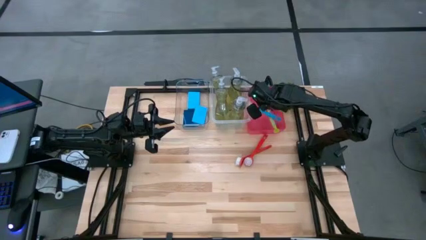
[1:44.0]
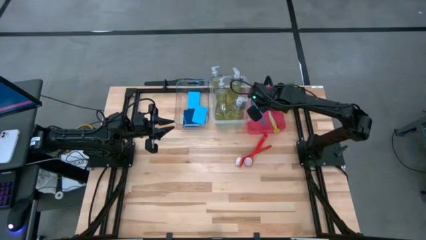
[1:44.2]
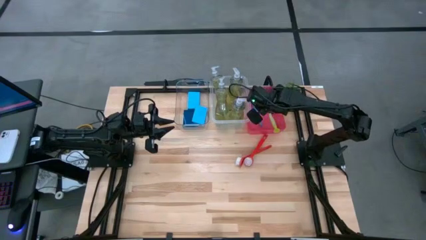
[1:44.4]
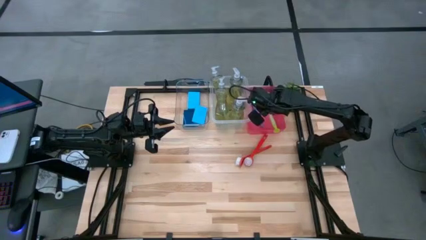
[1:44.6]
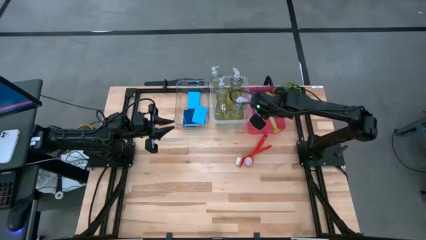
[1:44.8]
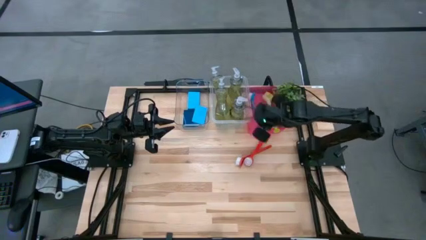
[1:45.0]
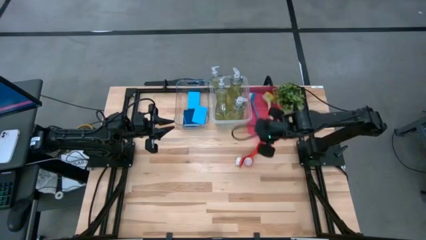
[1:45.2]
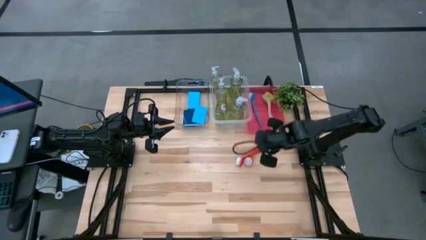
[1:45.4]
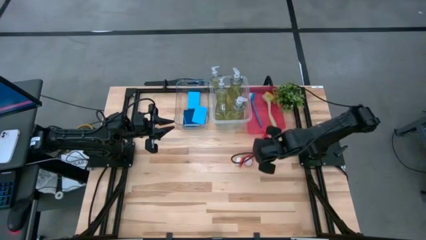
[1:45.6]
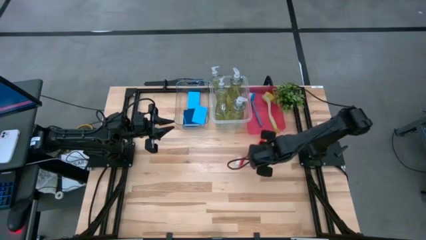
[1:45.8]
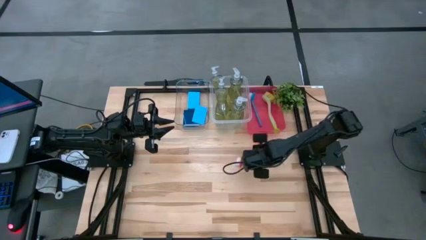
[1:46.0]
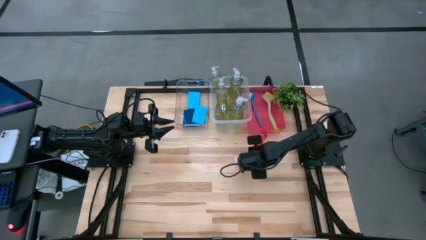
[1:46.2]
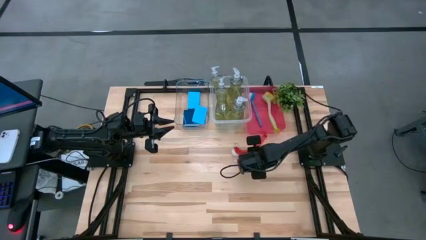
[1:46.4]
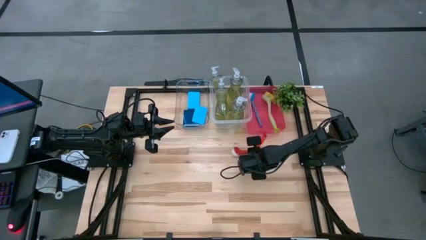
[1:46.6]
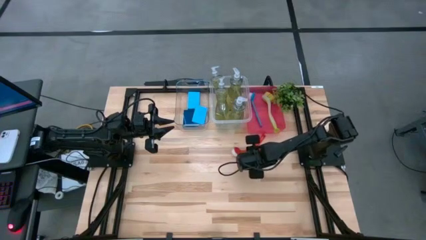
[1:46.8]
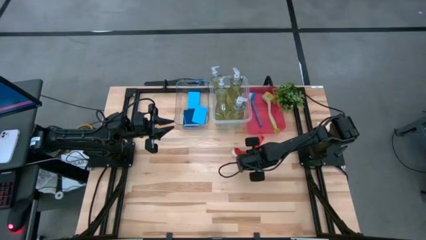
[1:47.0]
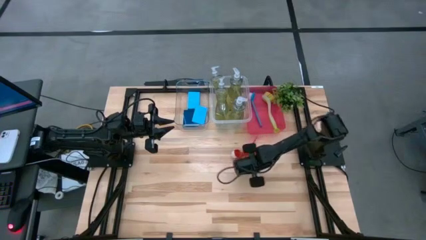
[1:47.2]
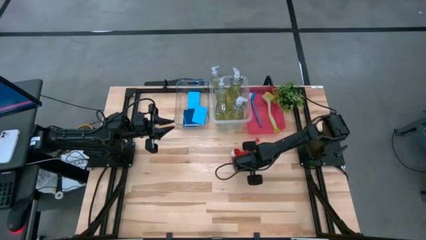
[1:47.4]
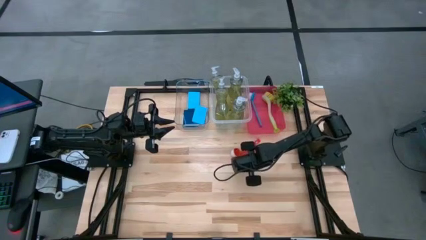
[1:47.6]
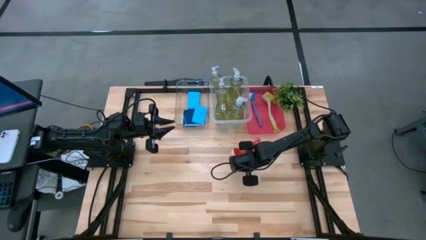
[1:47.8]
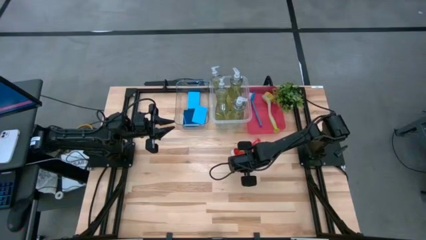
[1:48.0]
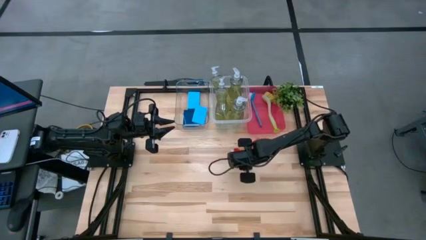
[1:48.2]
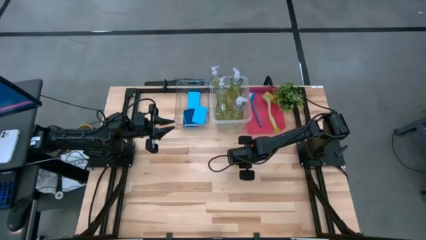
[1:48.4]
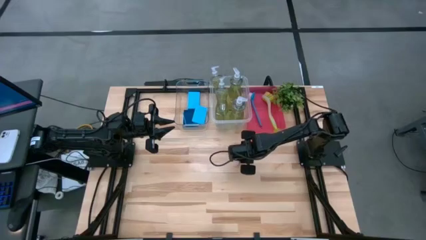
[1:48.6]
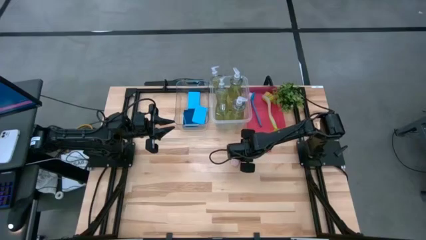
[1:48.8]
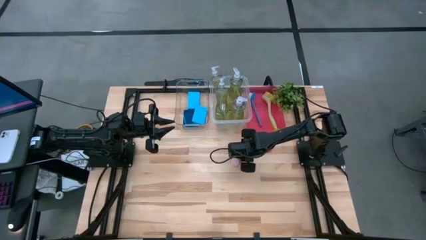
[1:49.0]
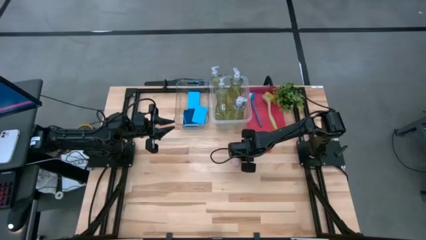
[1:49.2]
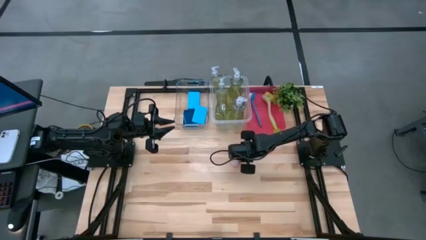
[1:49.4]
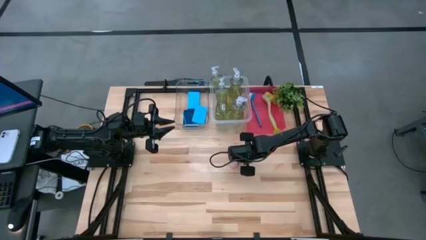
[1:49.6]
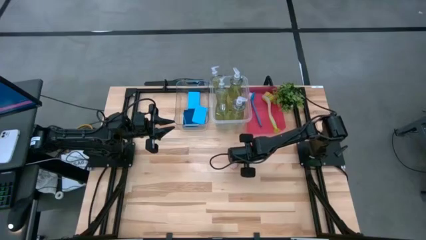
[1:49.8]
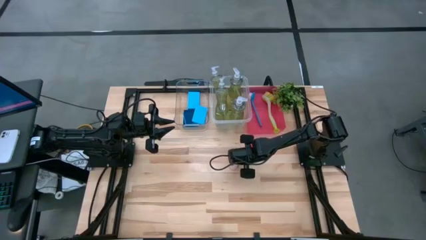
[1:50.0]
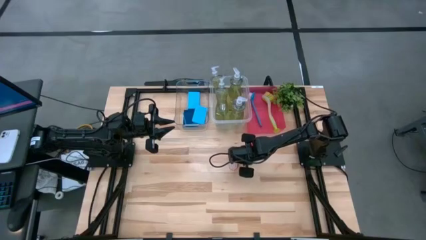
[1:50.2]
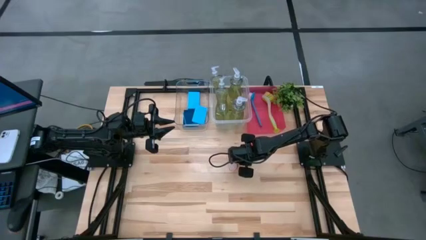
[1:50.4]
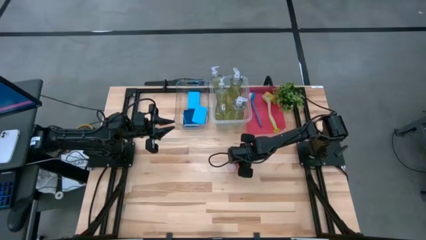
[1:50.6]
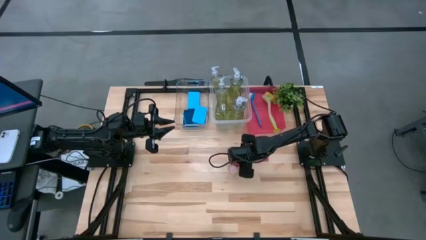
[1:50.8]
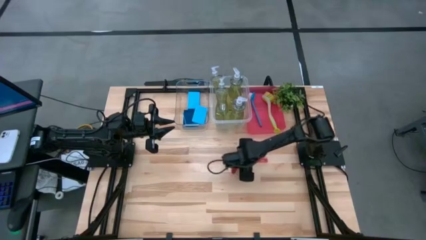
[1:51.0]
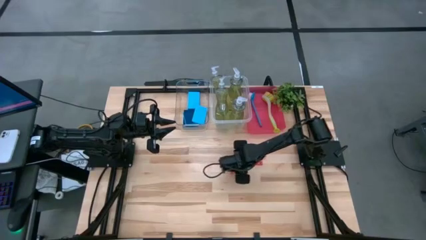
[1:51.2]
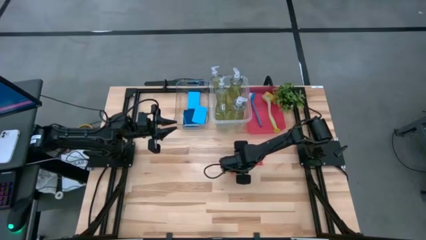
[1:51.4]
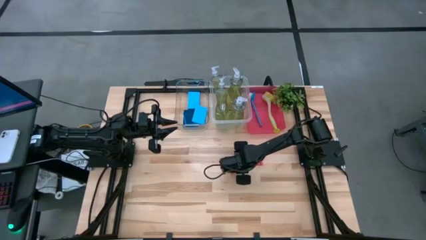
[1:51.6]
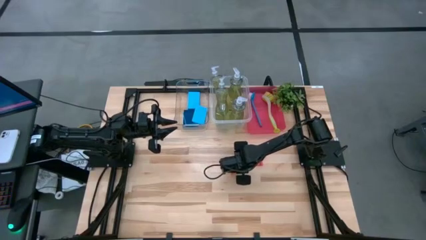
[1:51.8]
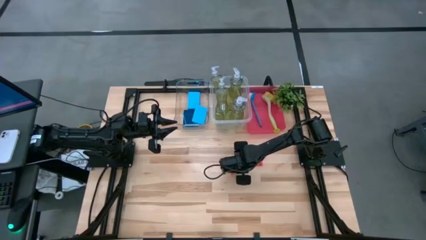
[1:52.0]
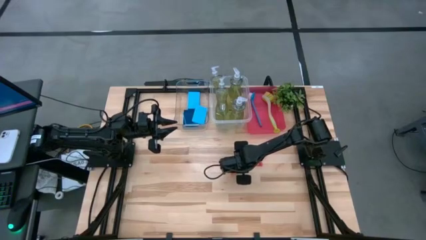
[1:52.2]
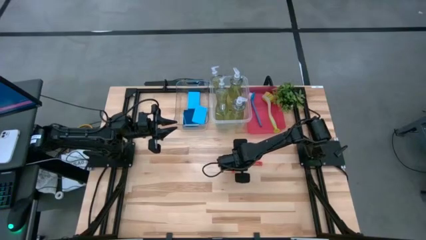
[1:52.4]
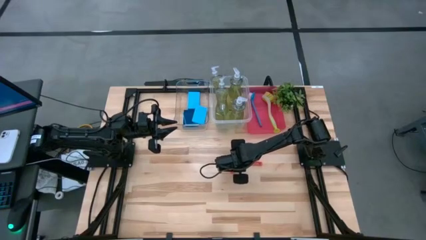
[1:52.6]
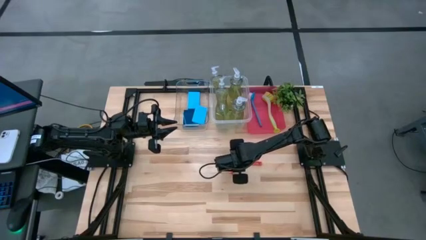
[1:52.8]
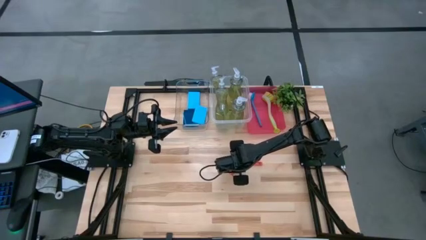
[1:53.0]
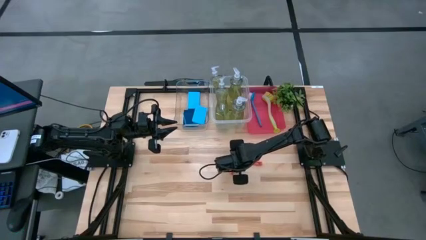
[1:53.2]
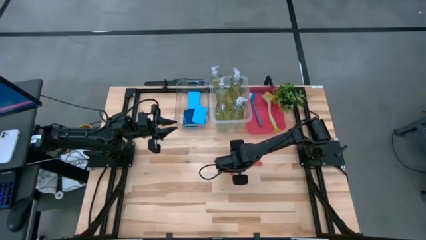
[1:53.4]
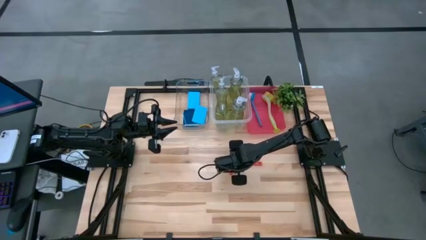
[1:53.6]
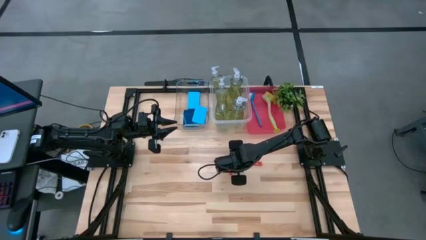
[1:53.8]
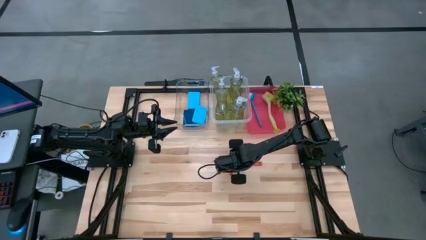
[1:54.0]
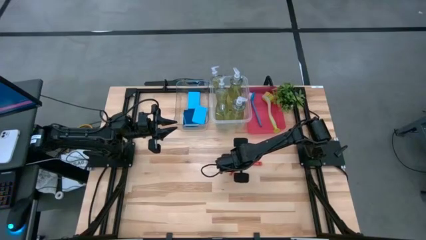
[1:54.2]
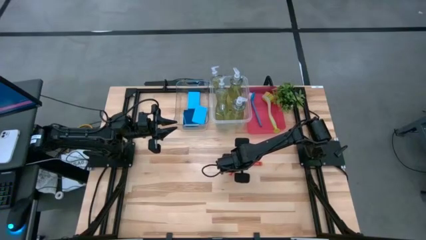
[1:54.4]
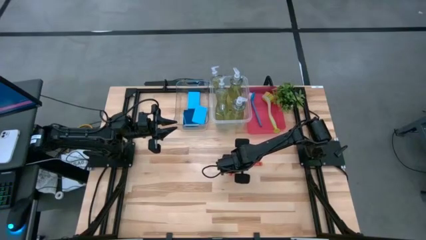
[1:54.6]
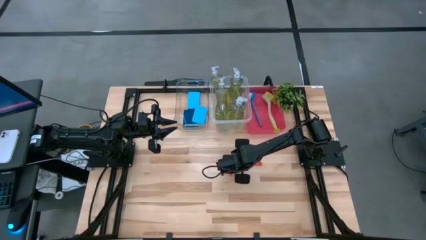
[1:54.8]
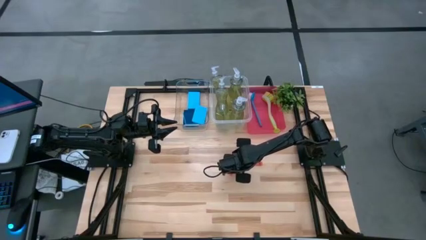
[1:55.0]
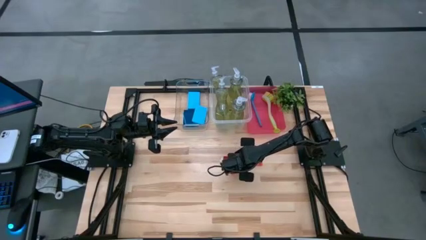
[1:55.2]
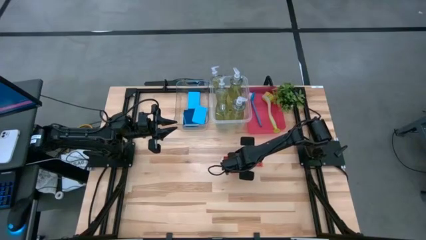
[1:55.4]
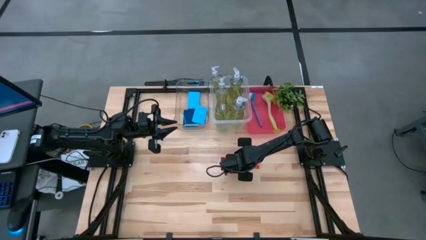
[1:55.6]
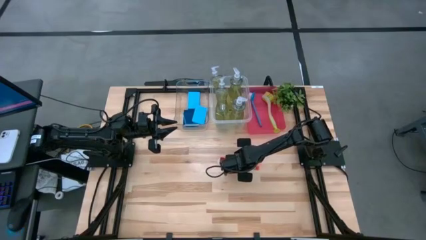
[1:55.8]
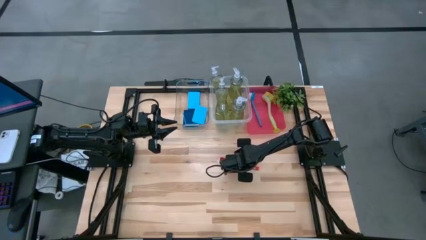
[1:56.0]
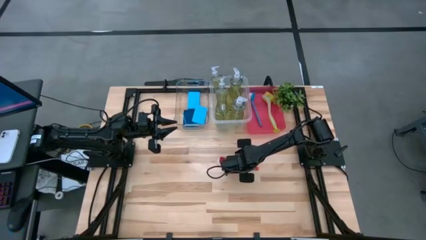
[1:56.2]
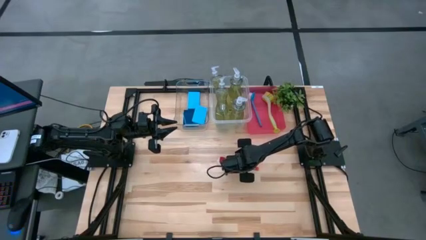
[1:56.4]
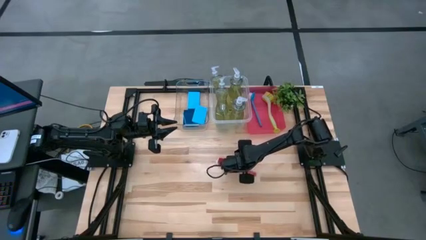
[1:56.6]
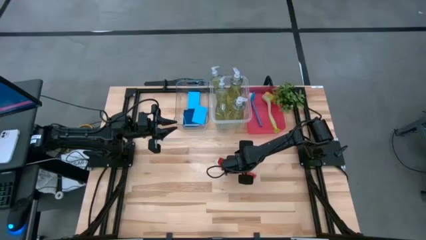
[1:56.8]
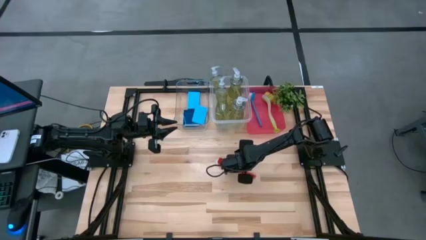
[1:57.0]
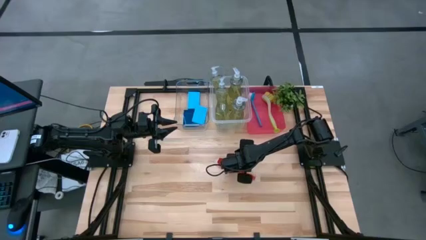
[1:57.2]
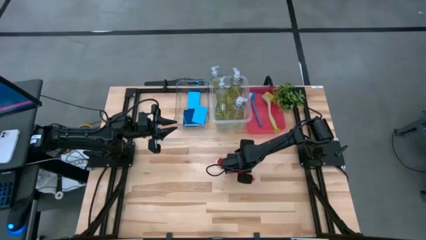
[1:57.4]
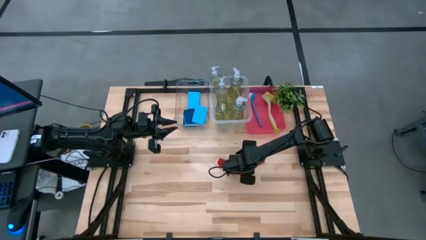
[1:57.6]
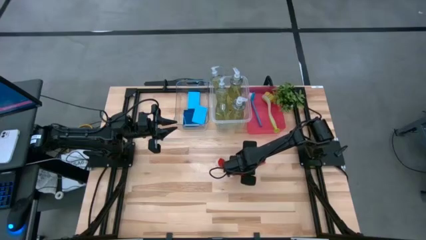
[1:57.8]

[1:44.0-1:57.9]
Task: Pick & Place Kitchen Sink Supplies
Put the red dish brush into the red bin
